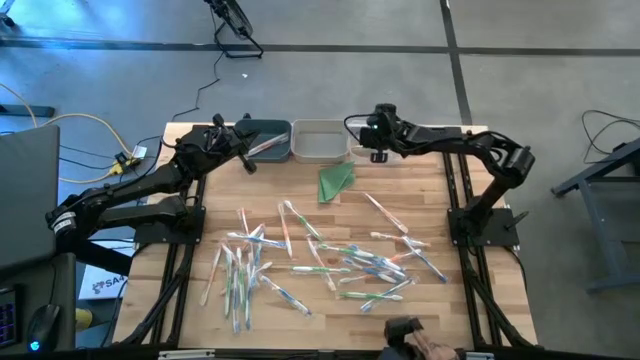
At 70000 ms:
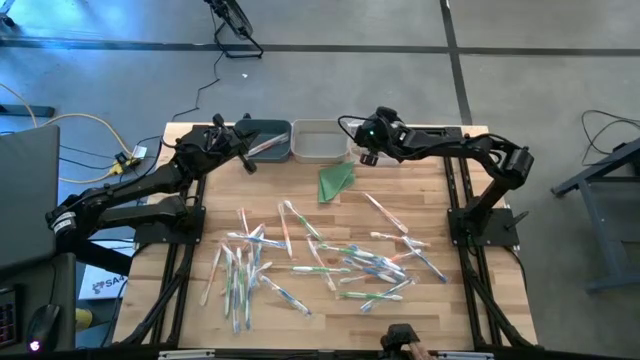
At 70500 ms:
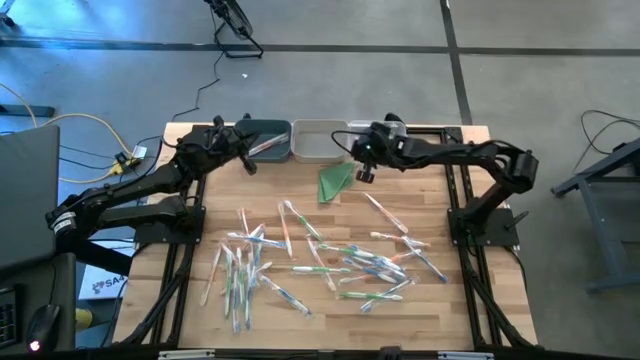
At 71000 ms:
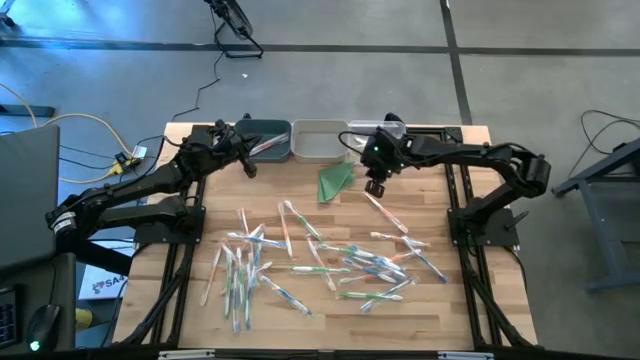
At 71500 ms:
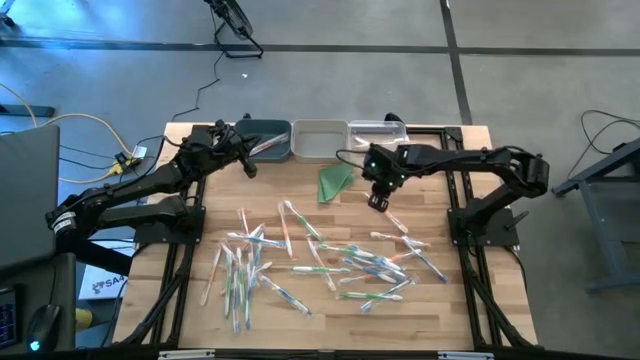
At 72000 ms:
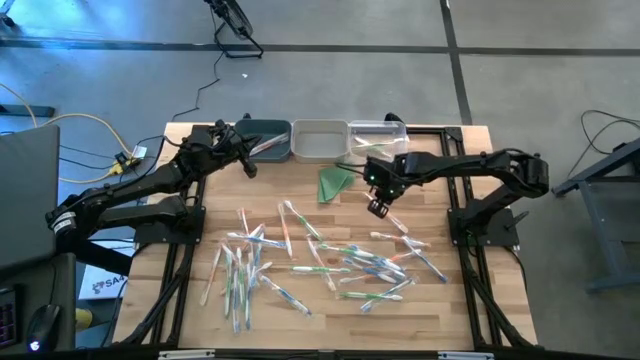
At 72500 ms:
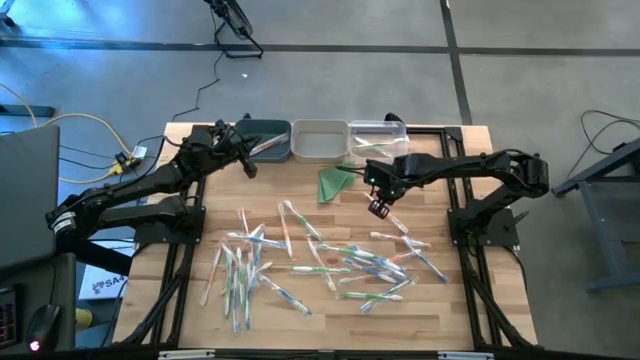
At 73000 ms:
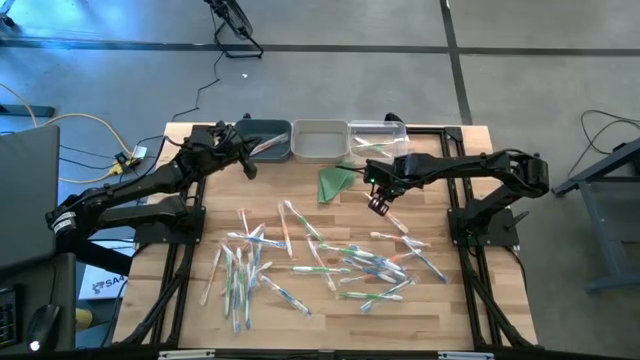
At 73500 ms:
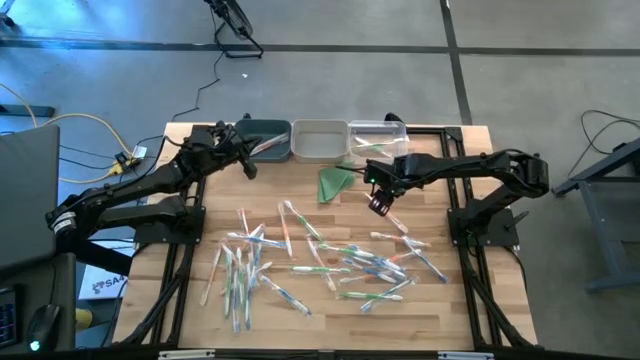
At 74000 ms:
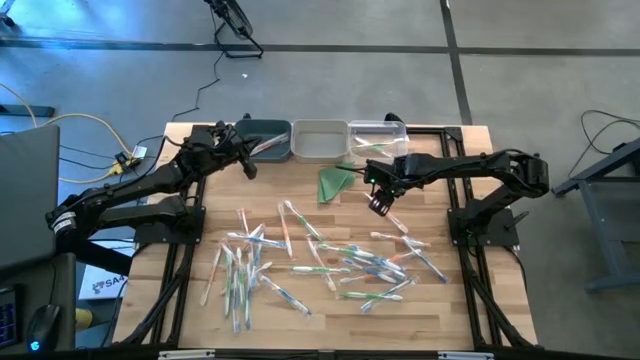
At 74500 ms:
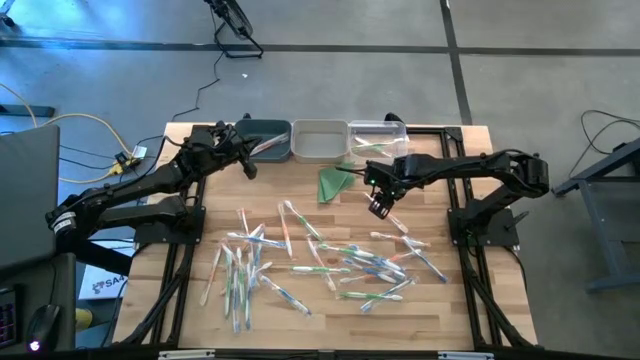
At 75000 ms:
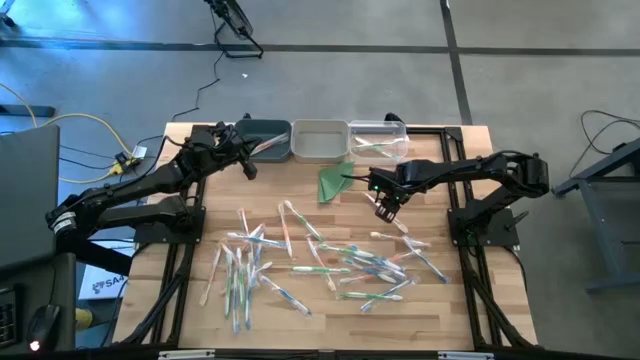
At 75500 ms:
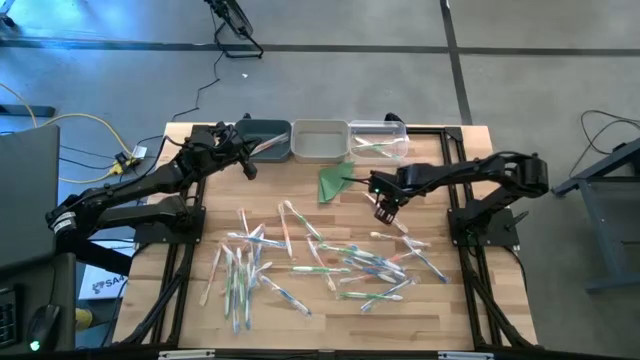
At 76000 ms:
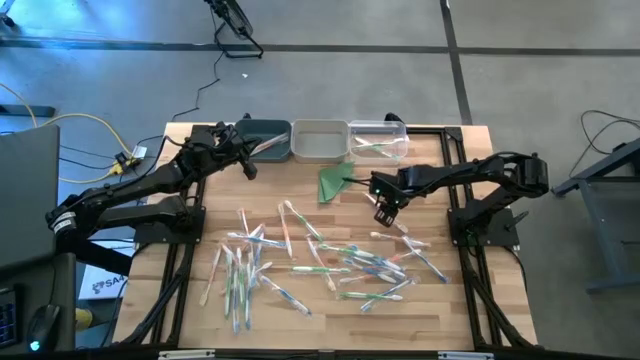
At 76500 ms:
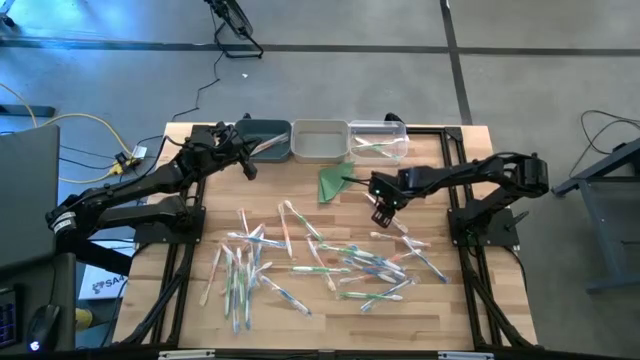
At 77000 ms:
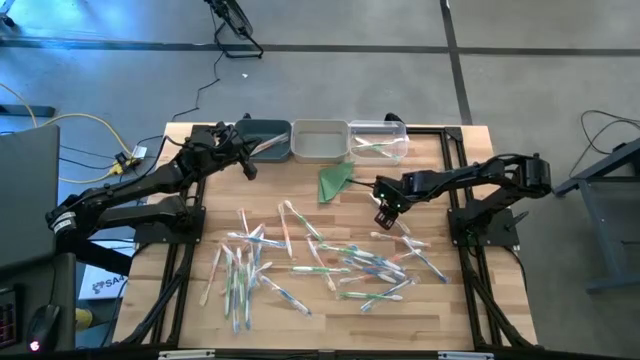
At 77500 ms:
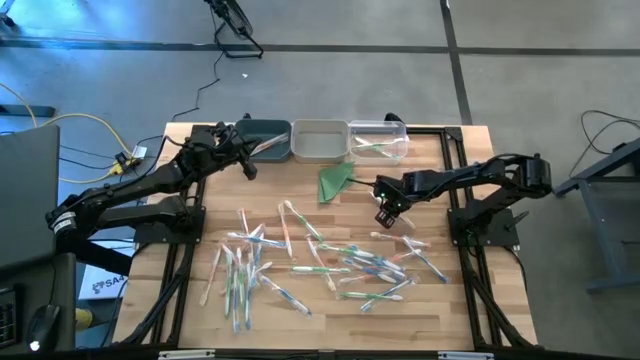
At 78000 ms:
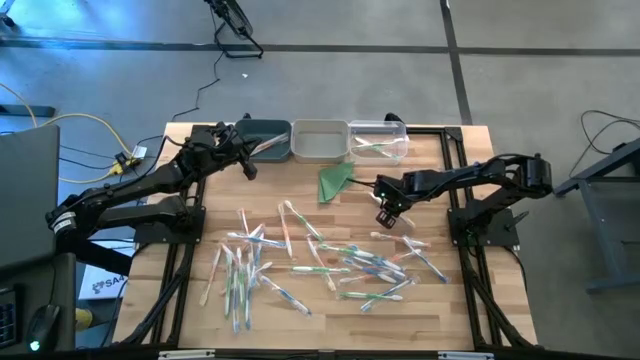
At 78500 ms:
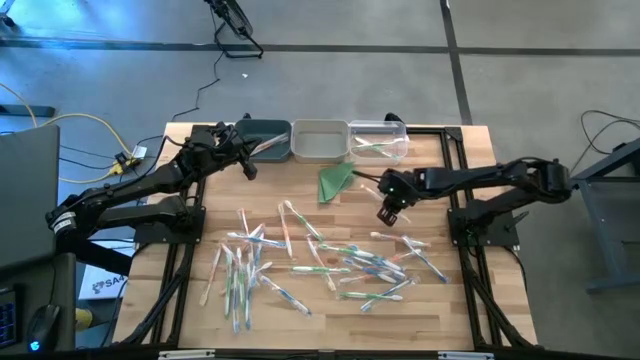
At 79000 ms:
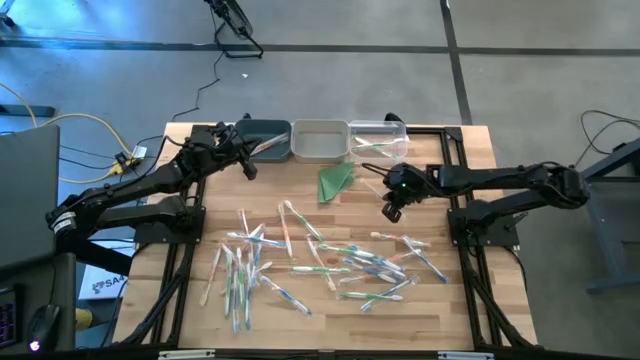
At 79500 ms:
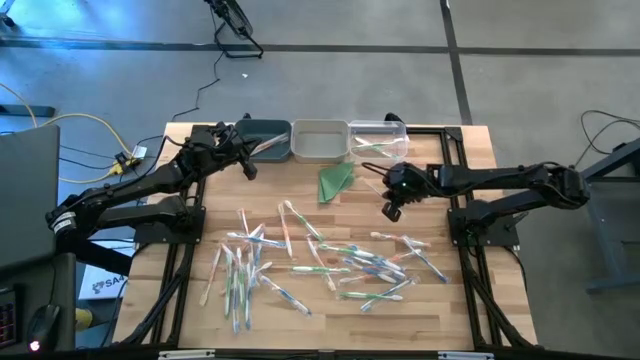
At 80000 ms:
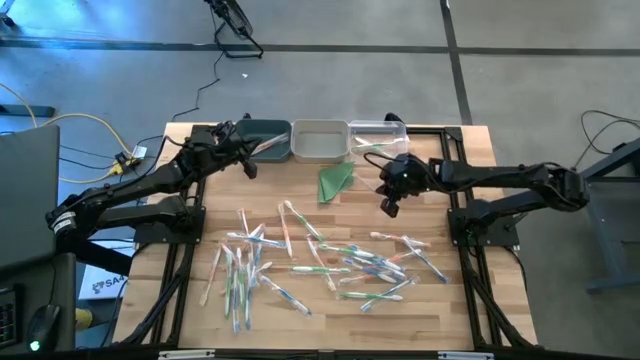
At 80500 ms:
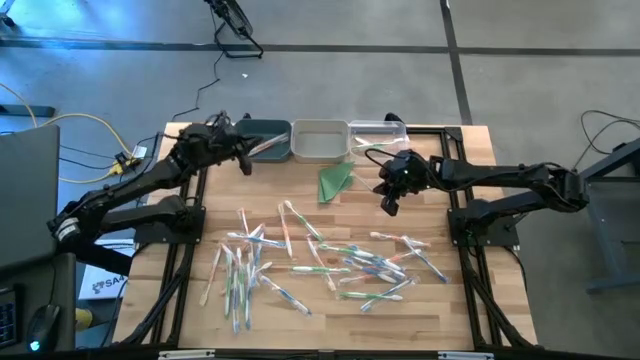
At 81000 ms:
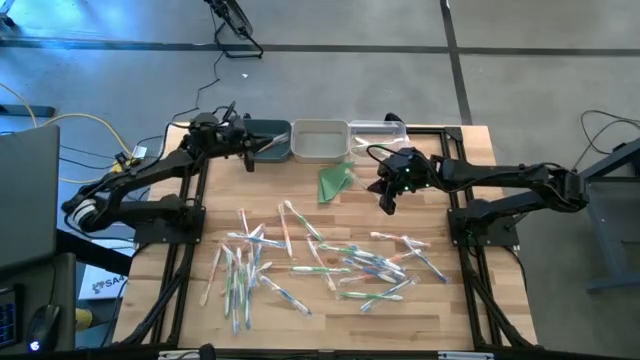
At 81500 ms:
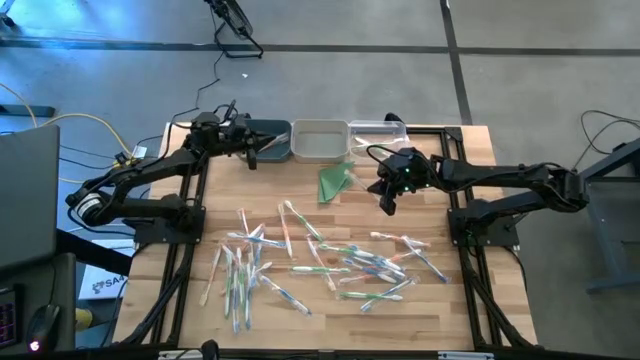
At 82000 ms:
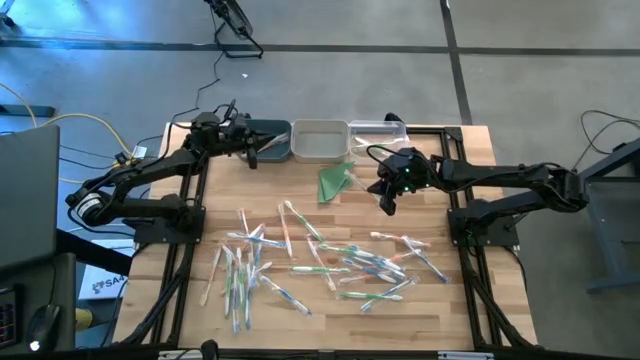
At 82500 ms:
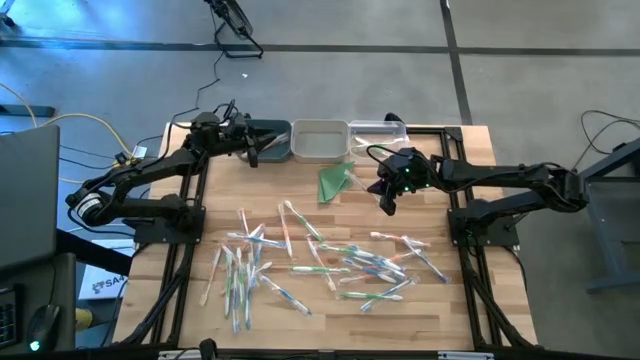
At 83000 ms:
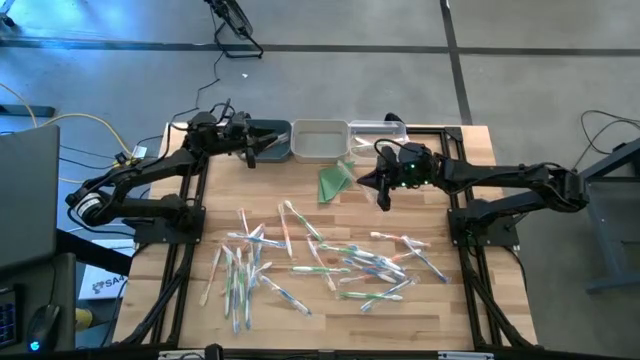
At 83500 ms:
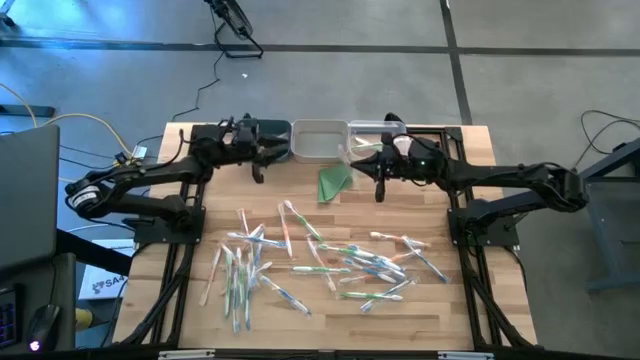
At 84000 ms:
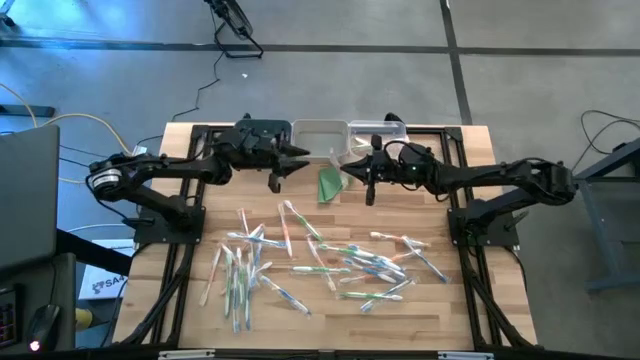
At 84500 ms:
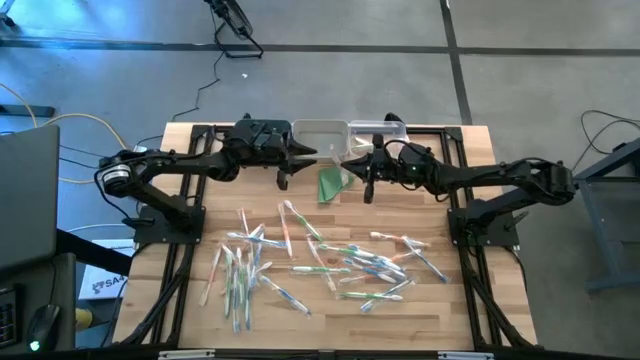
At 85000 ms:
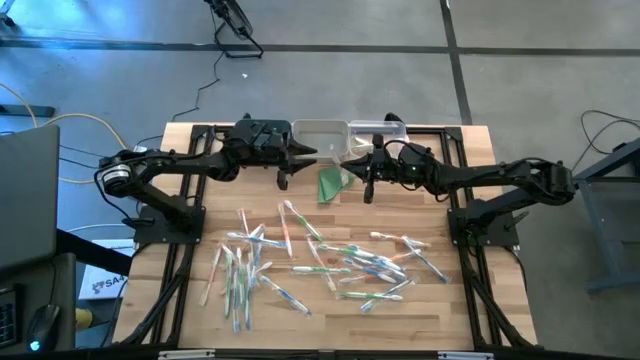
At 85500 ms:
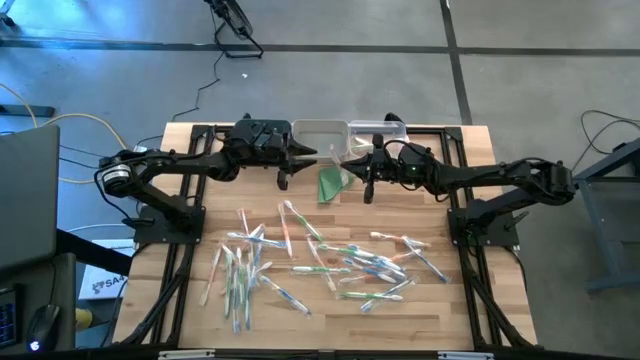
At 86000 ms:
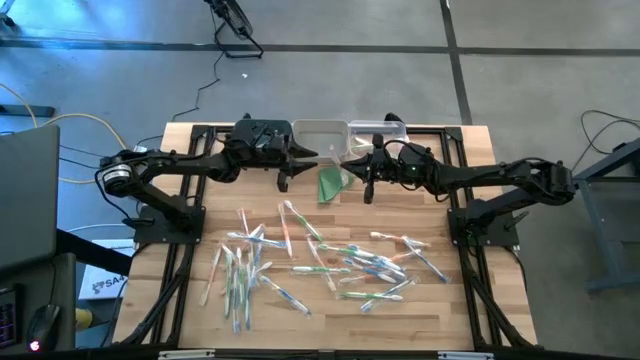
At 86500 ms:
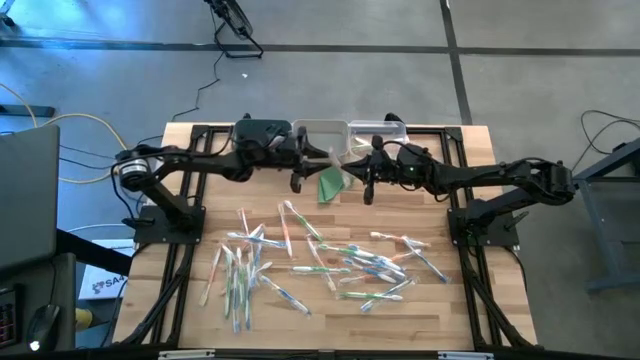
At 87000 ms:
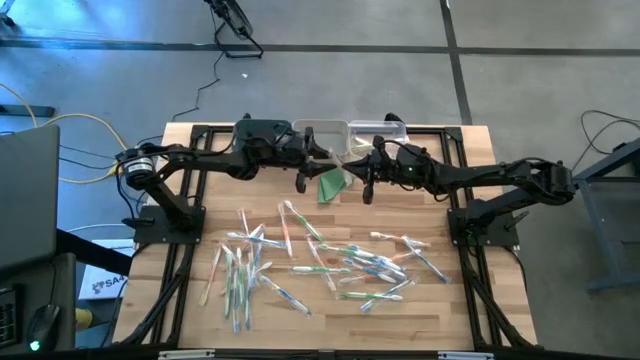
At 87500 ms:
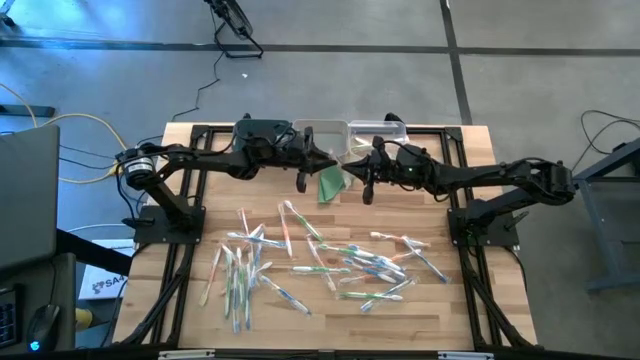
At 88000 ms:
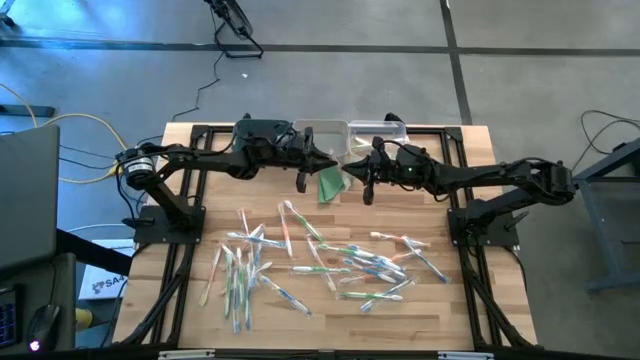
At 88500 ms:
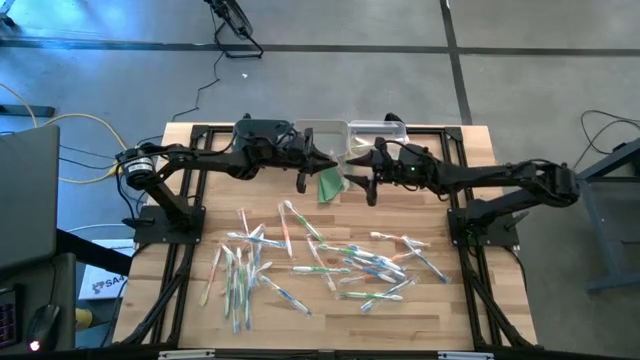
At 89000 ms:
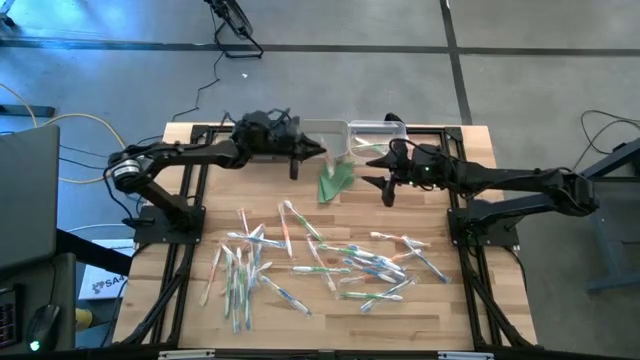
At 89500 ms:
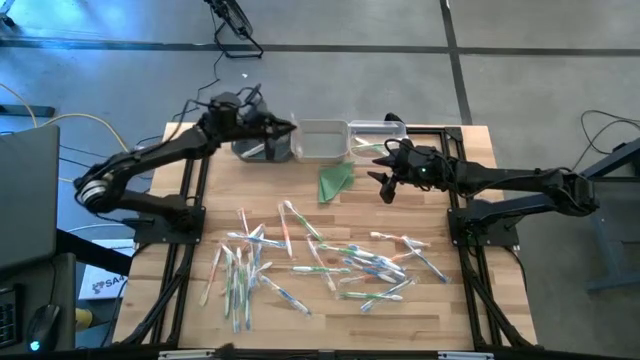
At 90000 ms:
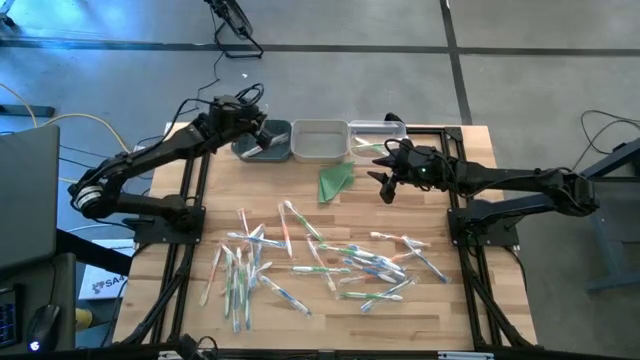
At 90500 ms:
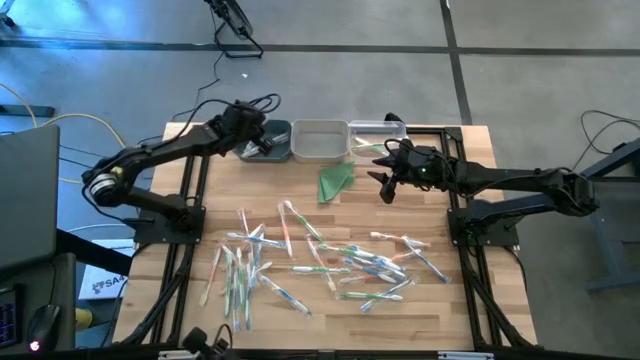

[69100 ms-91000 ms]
Task: Pick & Place Toothbrushes
Put the orange toothbrush into the dark blue bin
